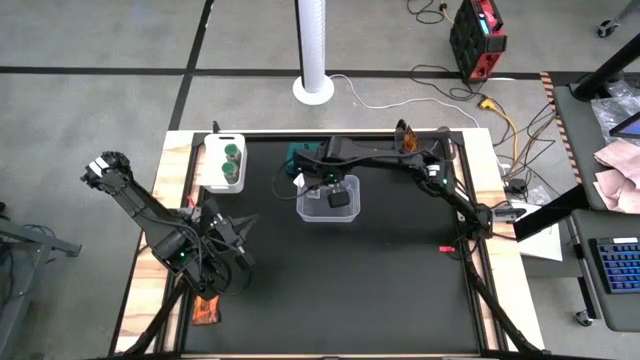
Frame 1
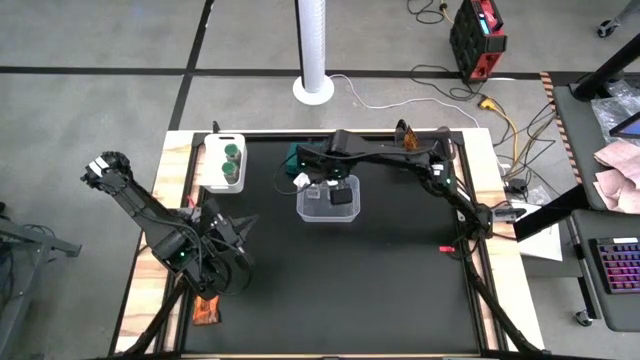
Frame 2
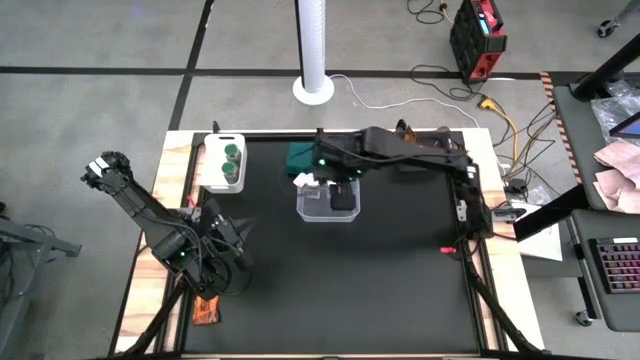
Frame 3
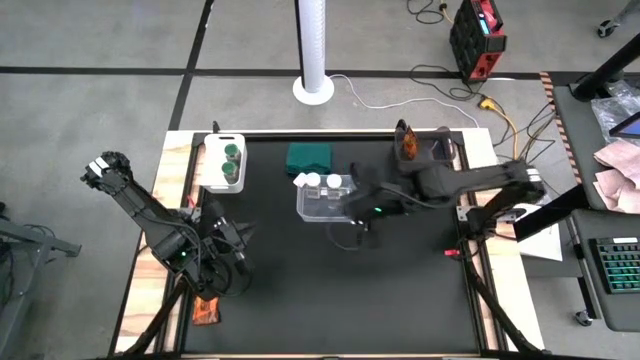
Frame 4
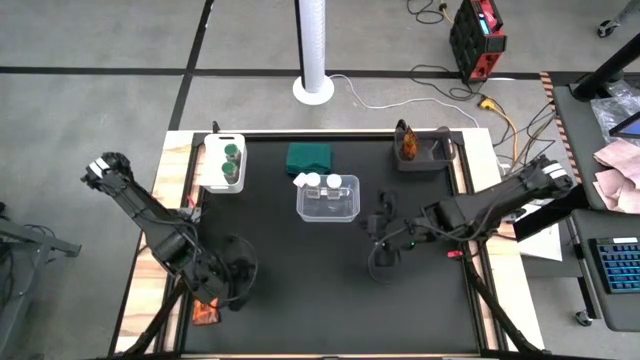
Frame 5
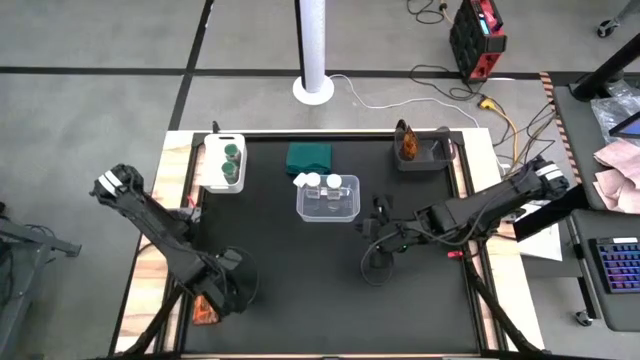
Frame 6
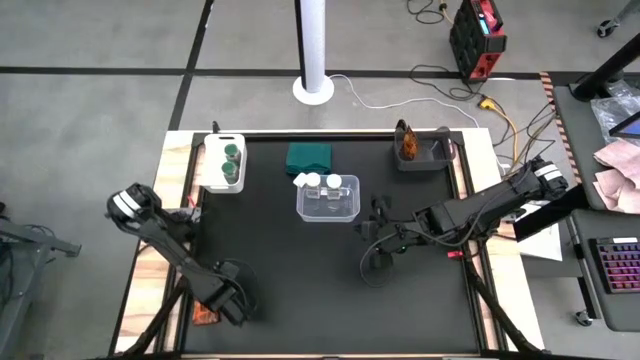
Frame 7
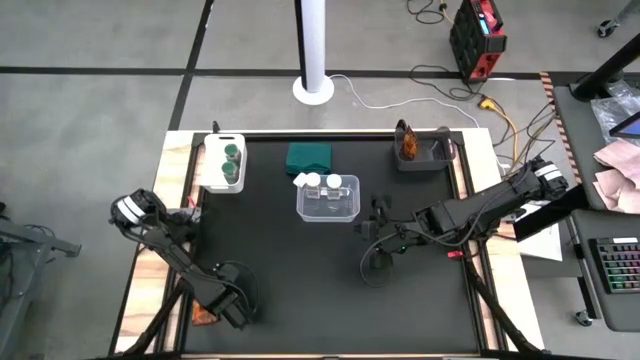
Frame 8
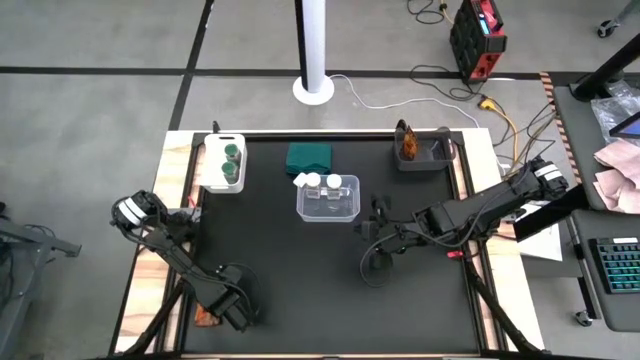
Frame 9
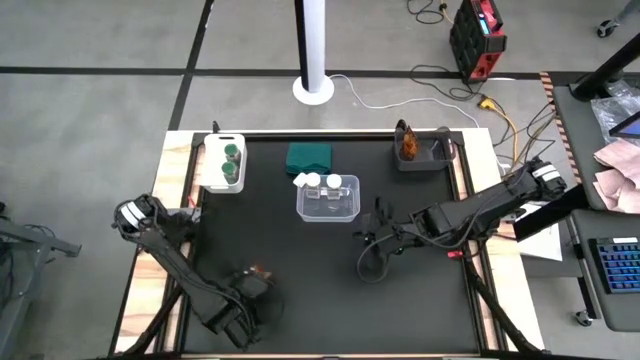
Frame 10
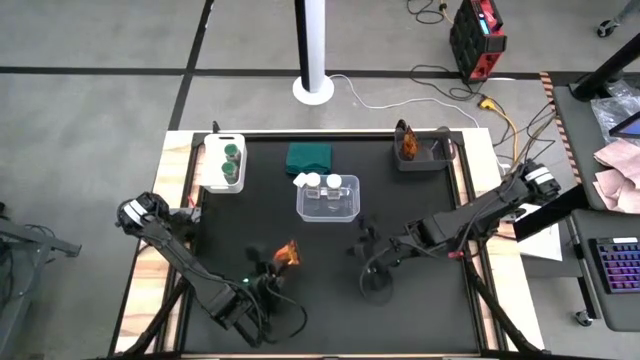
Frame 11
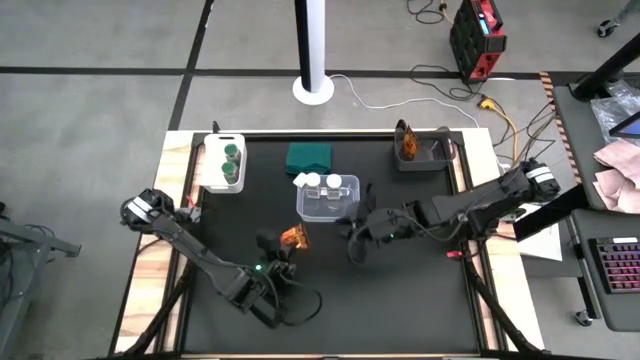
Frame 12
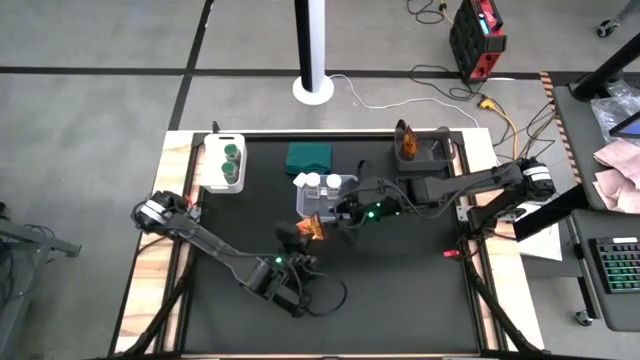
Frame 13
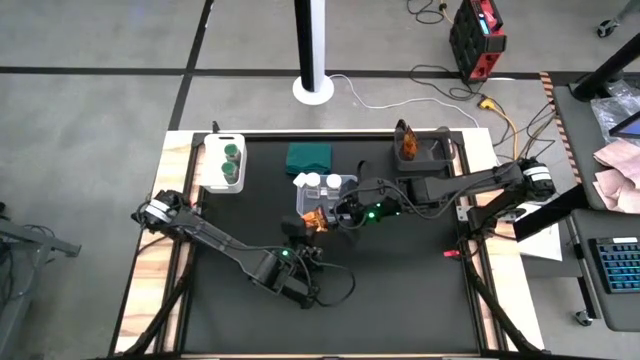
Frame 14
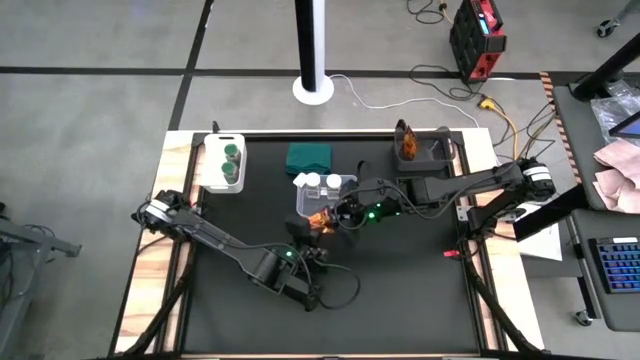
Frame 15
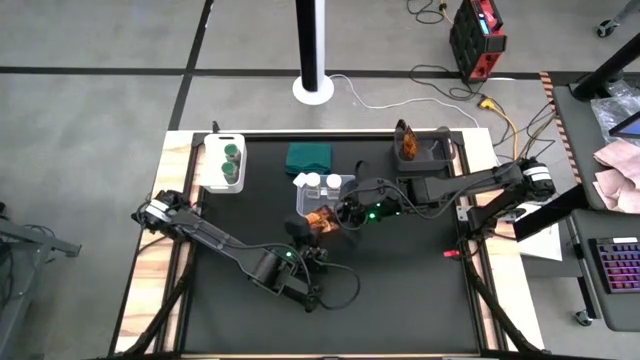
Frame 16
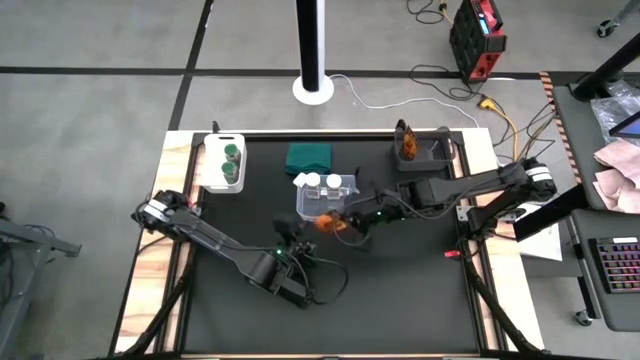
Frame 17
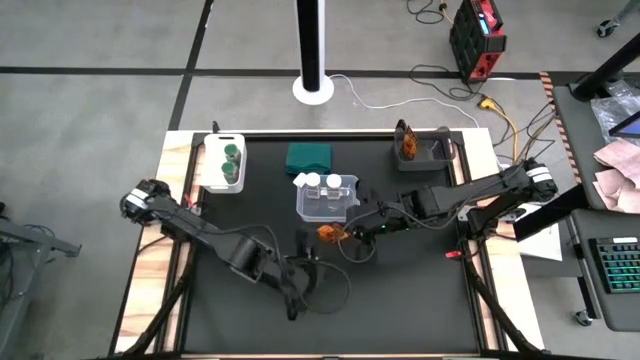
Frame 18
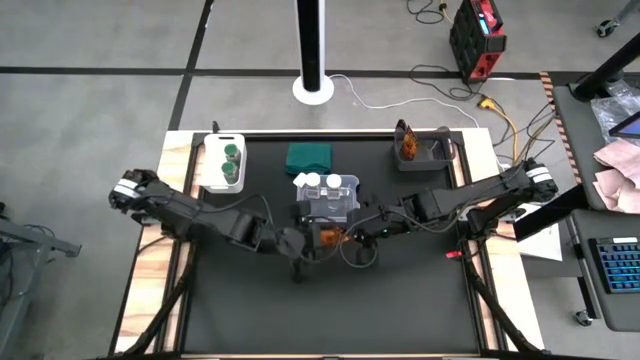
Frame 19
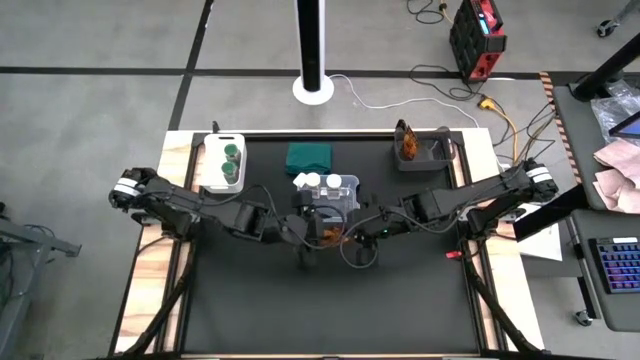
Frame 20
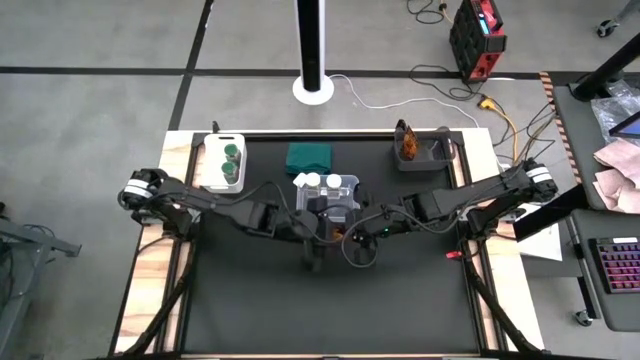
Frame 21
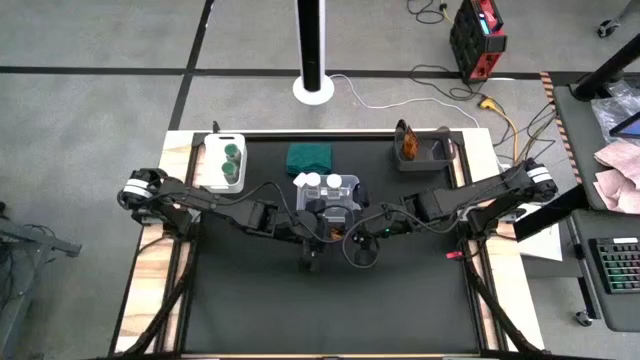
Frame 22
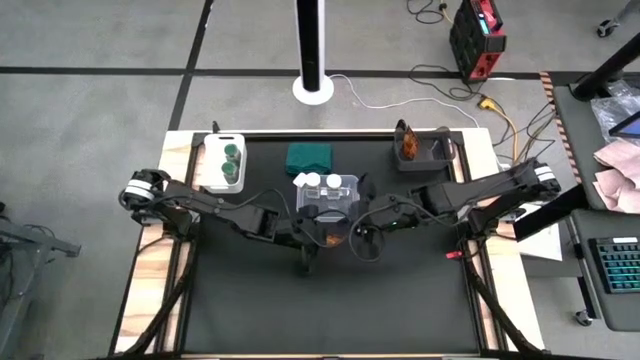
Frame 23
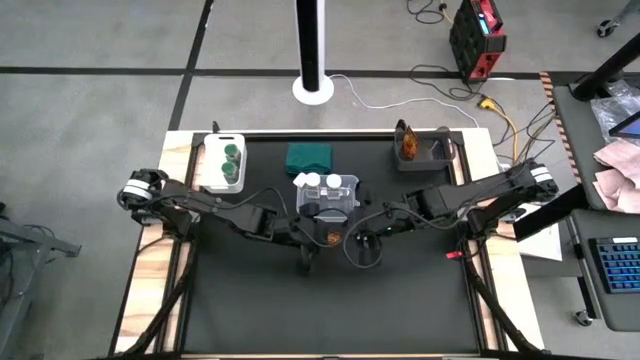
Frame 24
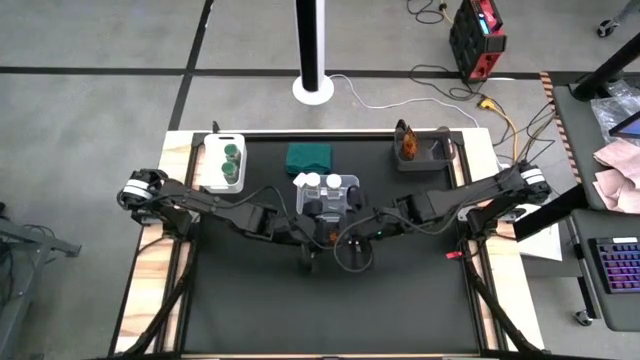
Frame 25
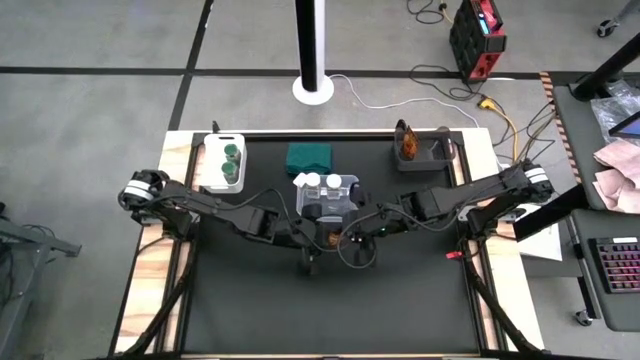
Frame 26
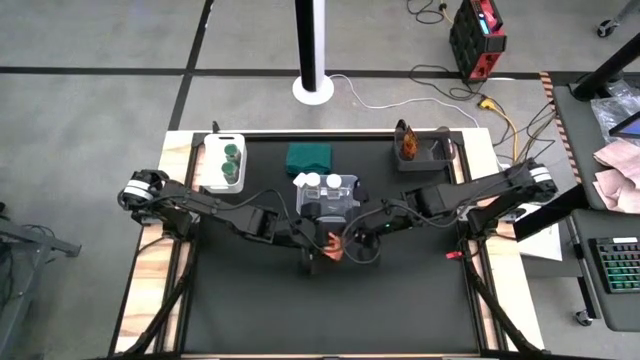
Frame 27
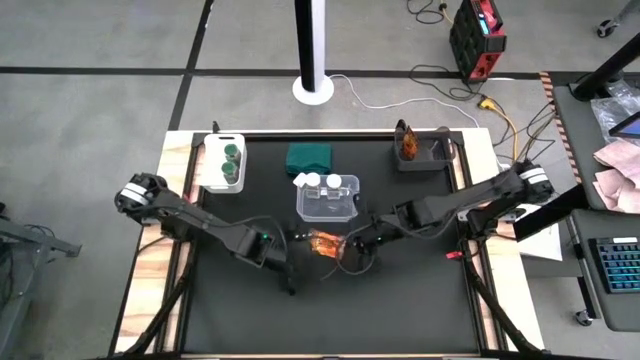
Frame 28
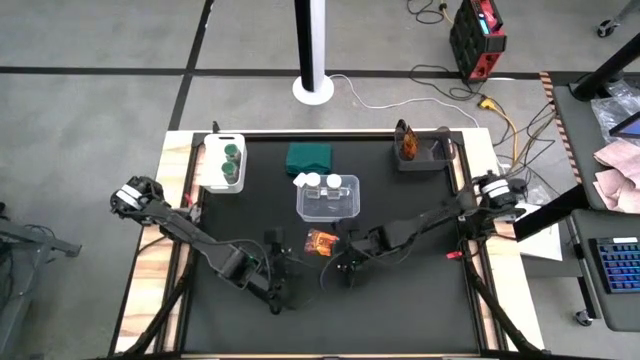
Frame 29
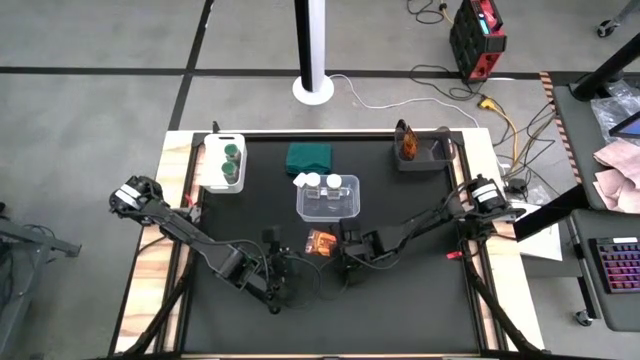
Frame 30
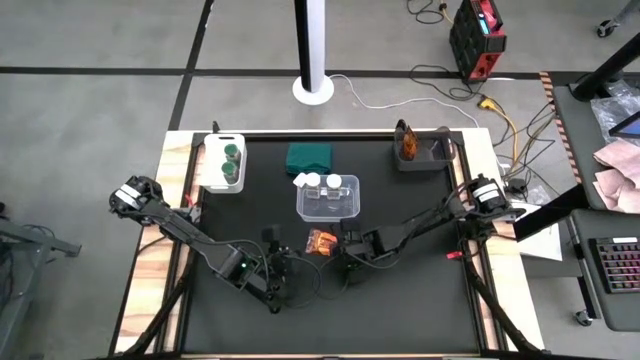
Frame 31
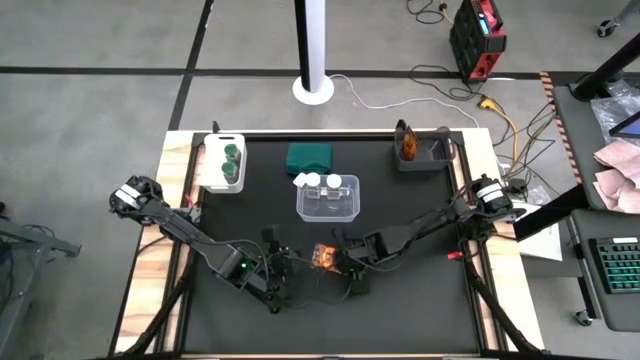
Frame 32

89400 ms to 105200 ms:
Task: Sort spices by type
Put the spice pack into the black bin

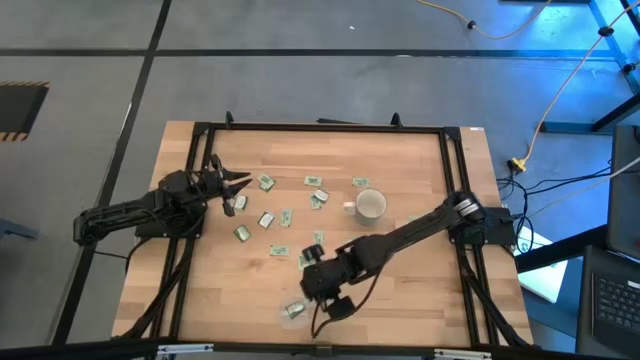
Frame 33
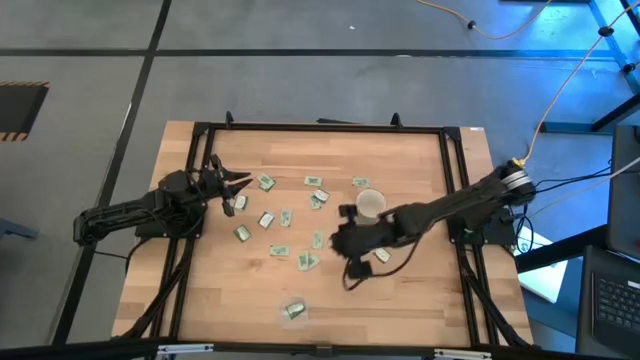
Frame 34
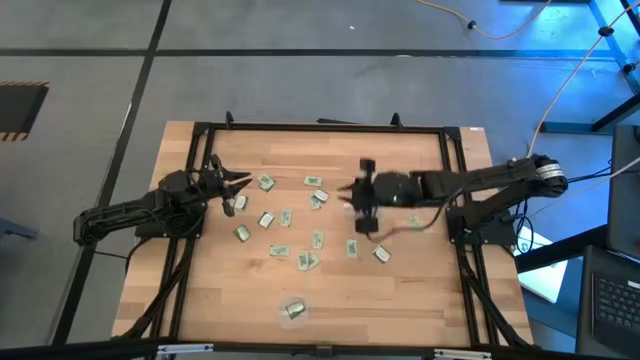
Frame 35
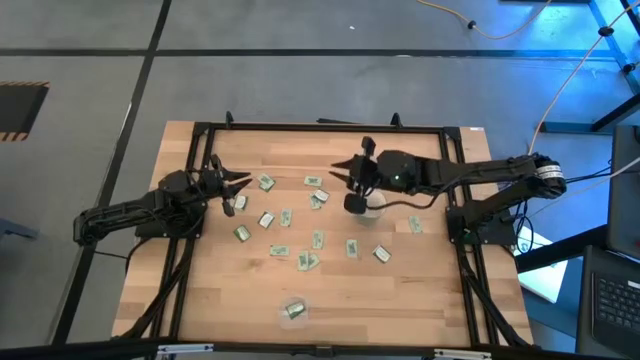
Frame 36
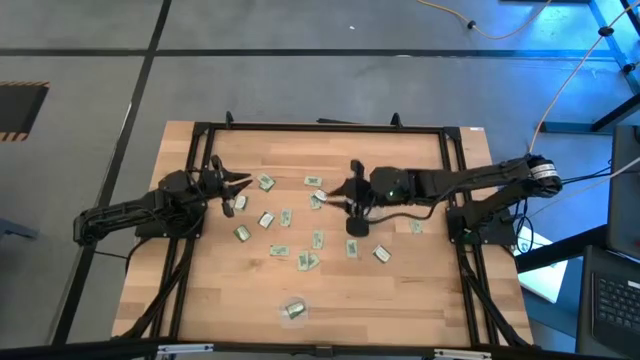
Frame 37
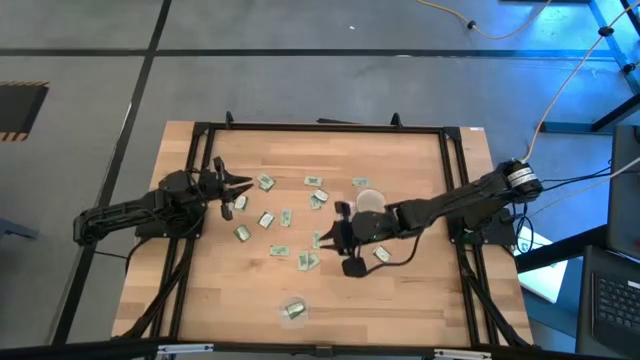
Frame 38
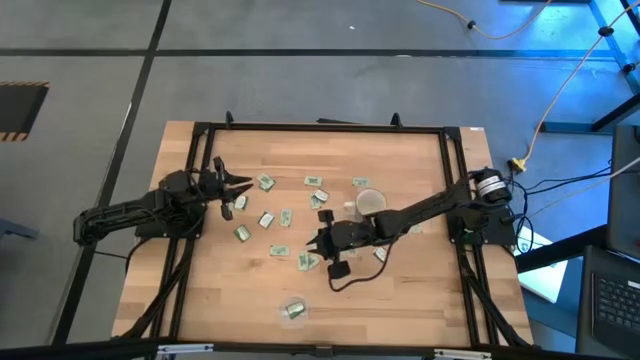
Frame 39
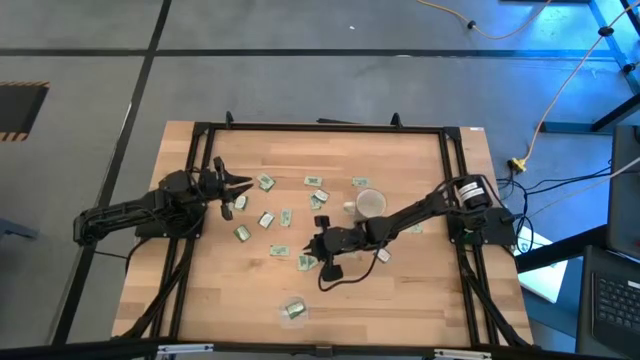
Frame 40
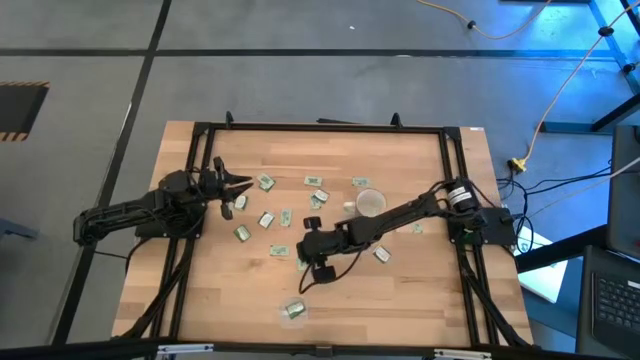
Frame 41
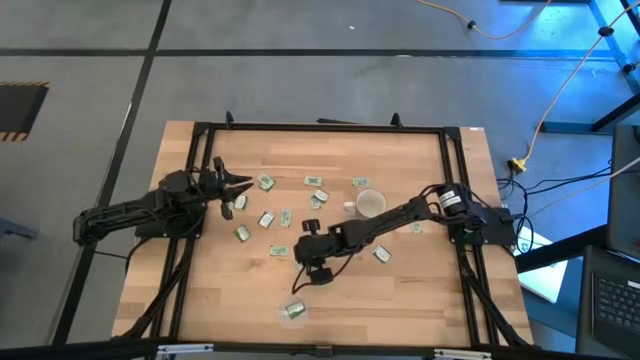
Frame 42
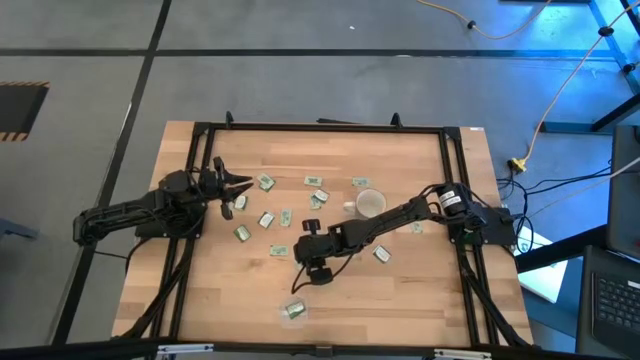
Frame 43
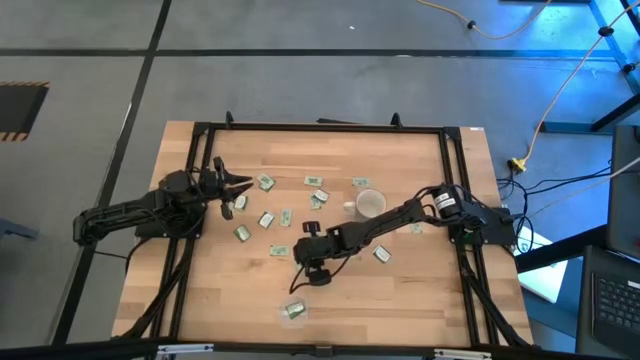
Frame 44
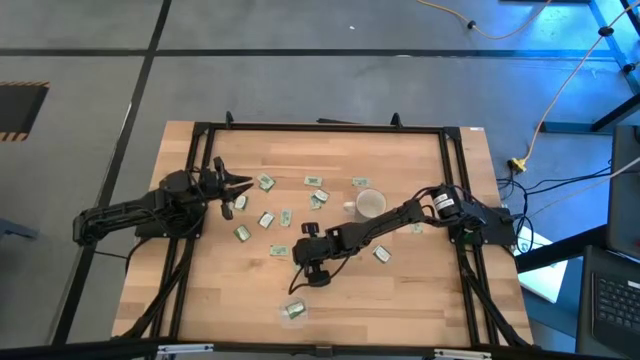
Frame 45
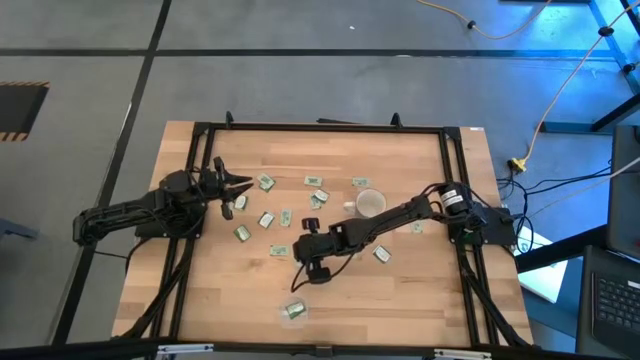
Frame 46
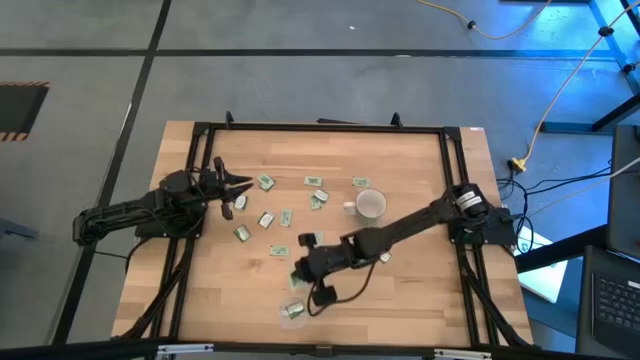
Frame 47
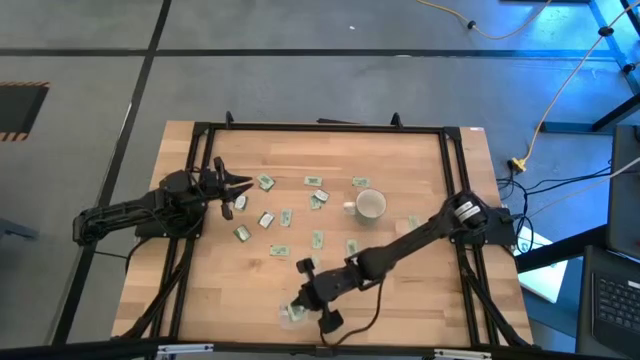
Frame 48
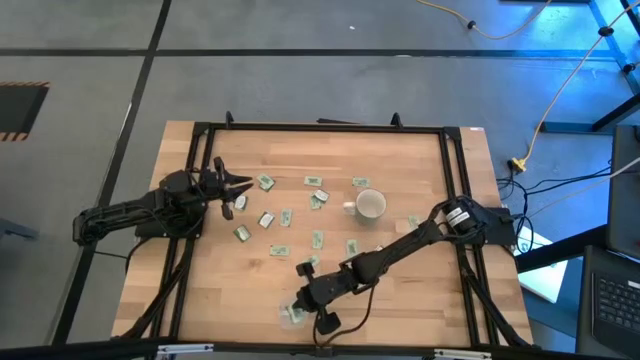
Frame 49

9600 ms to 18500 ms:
Task: Pick and place Stevia / Truvia into bins
Put the light green stevia packet into the transparent bin
